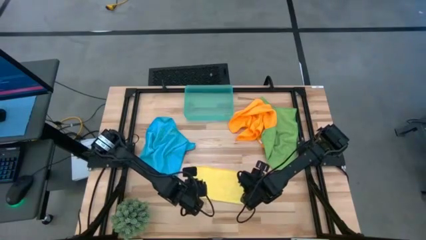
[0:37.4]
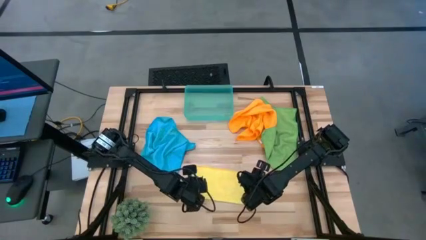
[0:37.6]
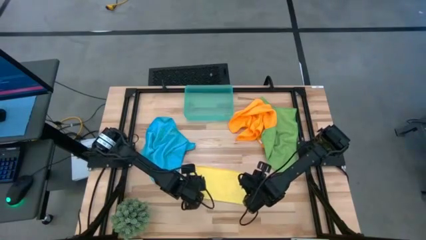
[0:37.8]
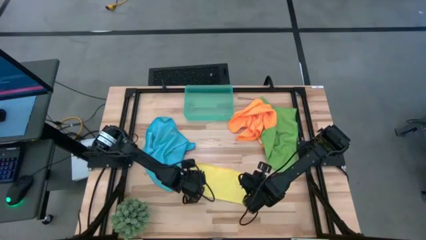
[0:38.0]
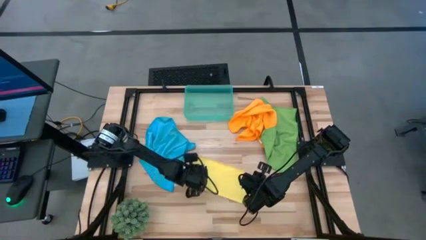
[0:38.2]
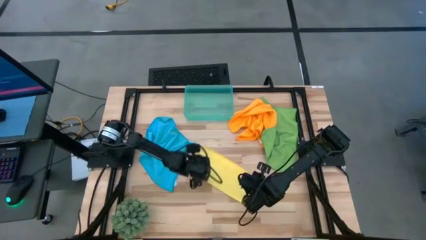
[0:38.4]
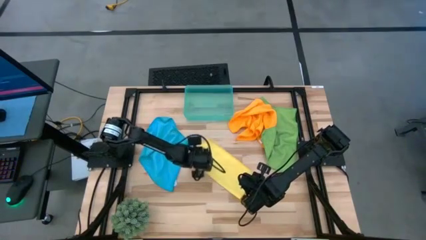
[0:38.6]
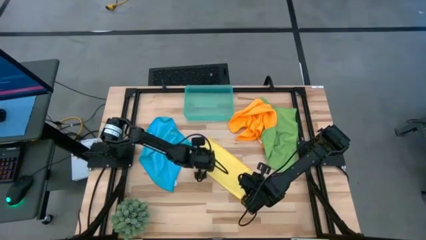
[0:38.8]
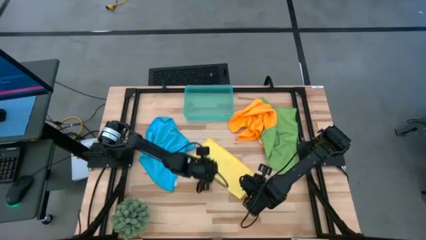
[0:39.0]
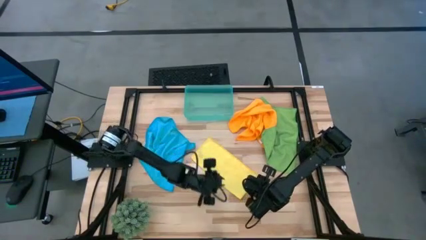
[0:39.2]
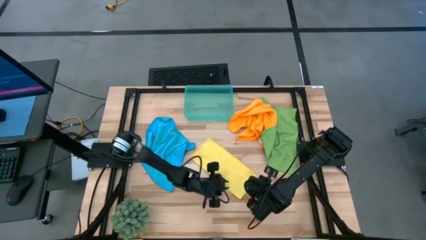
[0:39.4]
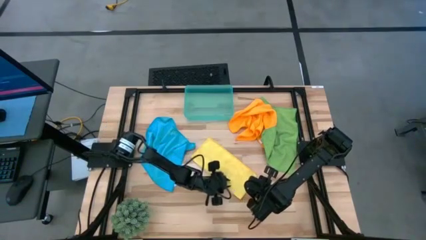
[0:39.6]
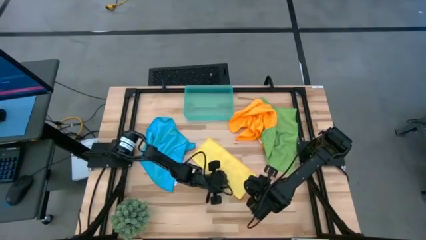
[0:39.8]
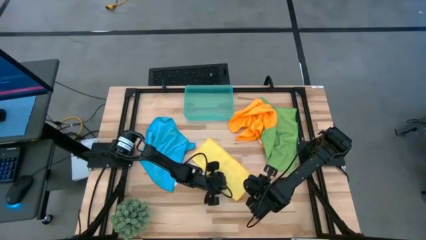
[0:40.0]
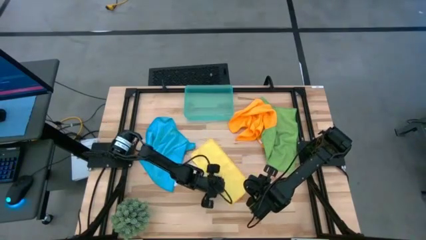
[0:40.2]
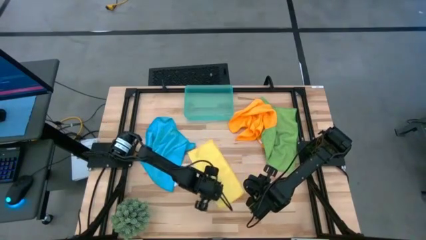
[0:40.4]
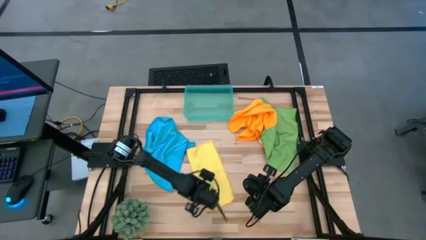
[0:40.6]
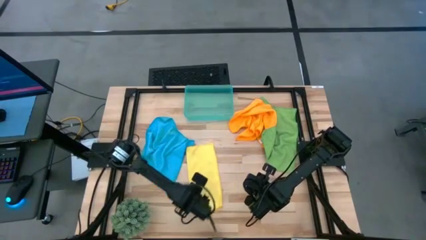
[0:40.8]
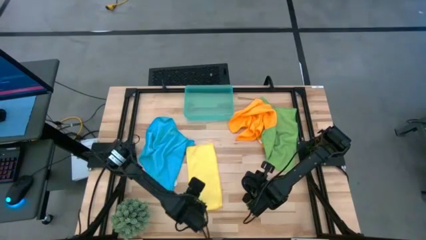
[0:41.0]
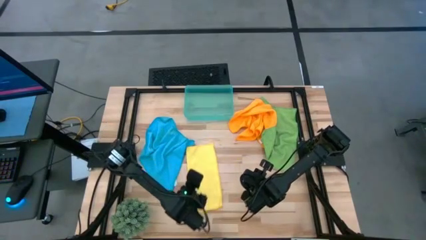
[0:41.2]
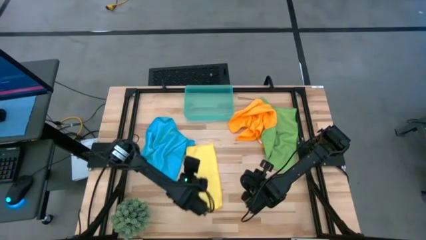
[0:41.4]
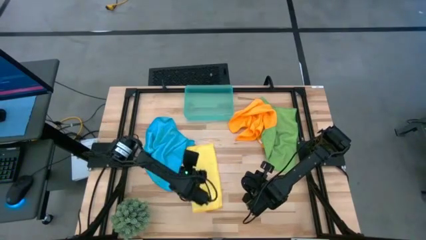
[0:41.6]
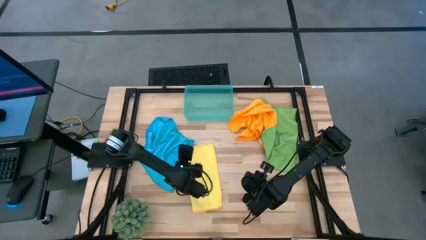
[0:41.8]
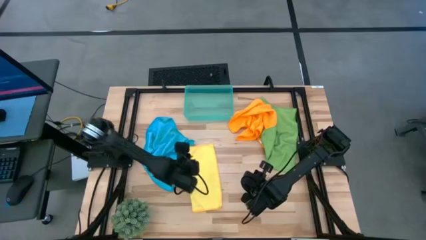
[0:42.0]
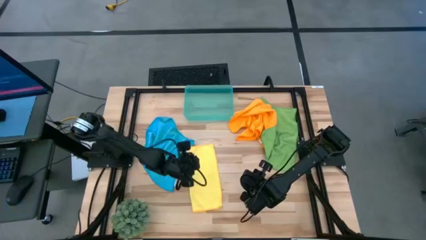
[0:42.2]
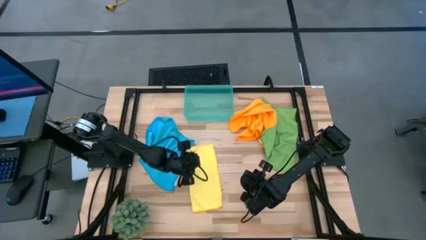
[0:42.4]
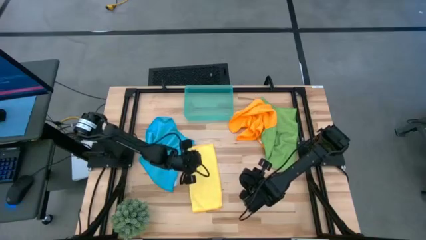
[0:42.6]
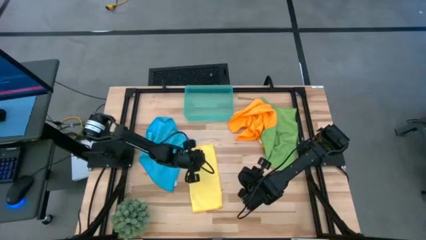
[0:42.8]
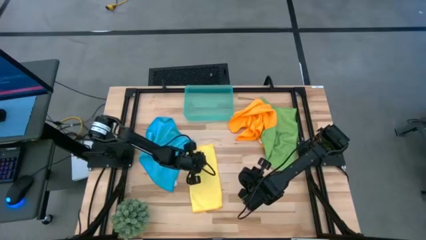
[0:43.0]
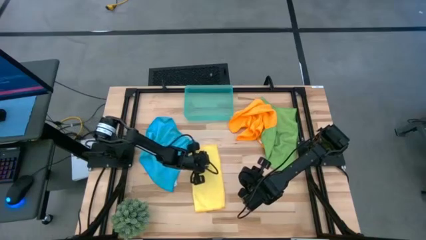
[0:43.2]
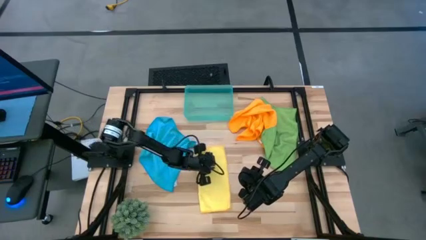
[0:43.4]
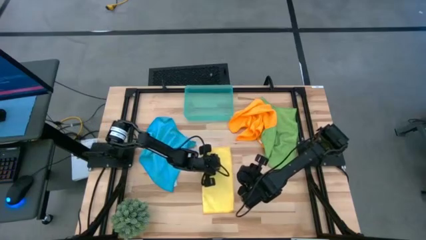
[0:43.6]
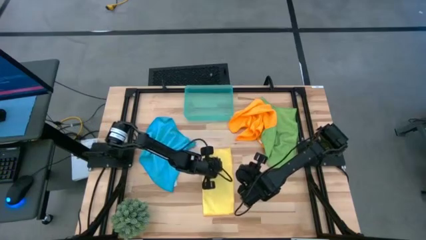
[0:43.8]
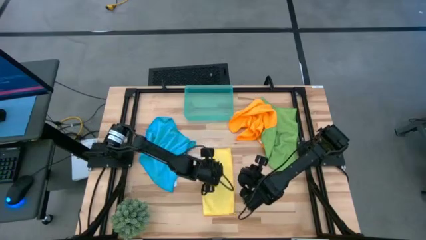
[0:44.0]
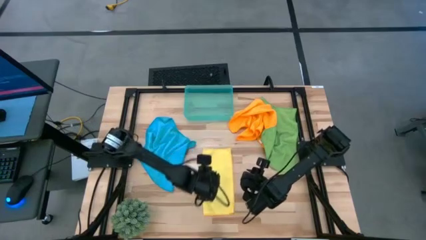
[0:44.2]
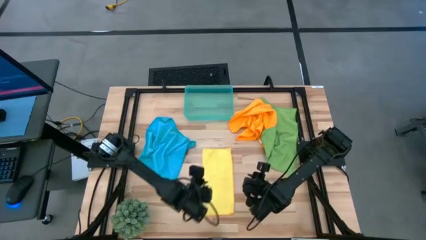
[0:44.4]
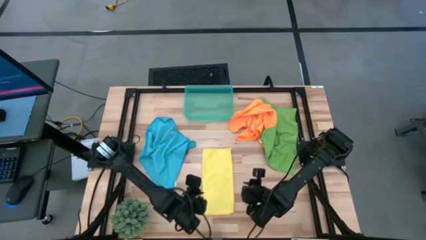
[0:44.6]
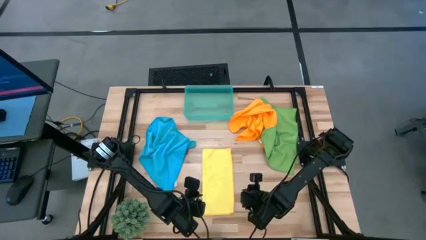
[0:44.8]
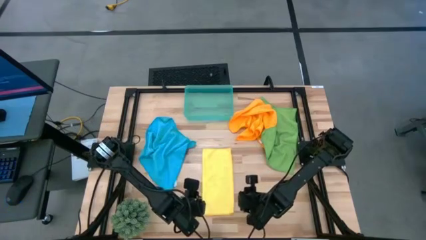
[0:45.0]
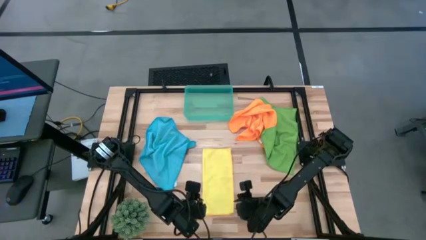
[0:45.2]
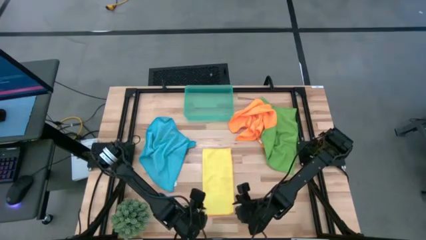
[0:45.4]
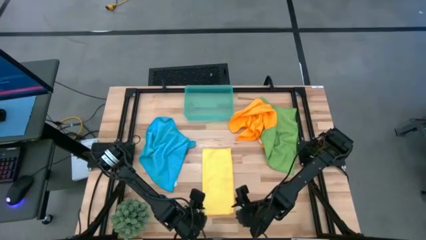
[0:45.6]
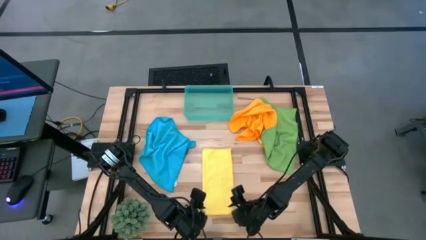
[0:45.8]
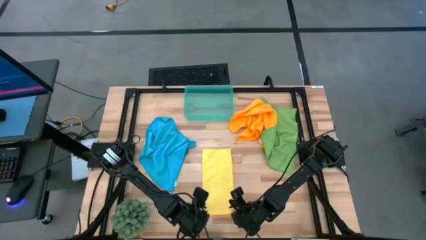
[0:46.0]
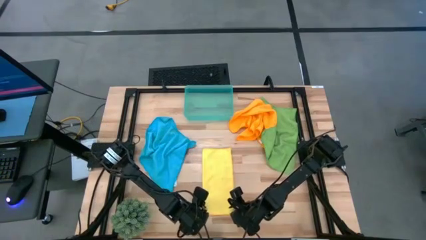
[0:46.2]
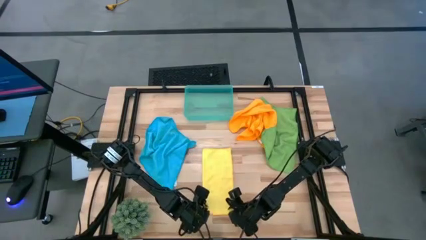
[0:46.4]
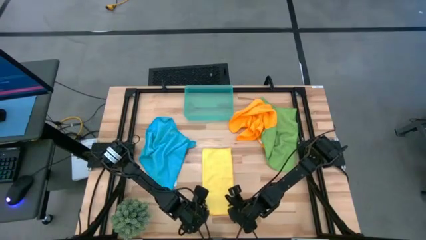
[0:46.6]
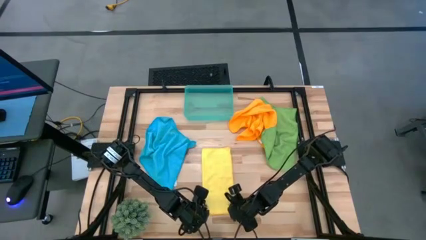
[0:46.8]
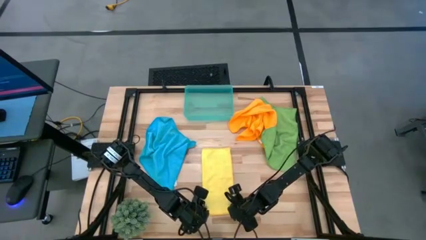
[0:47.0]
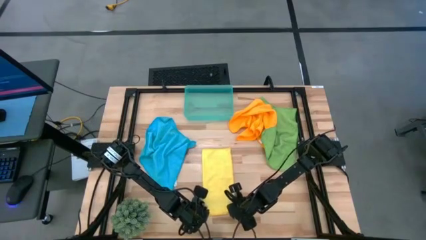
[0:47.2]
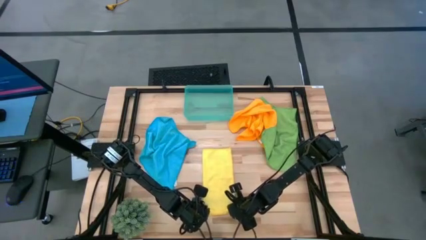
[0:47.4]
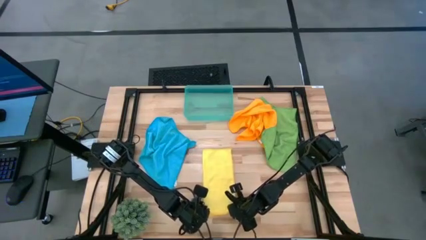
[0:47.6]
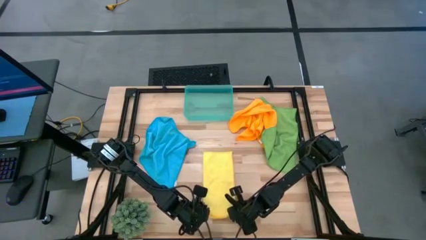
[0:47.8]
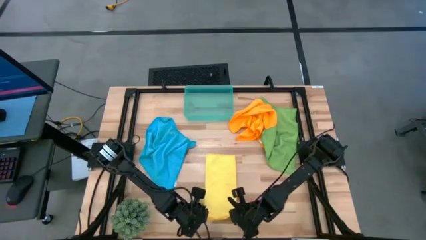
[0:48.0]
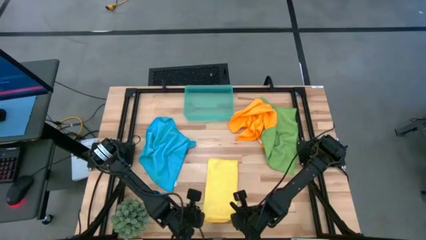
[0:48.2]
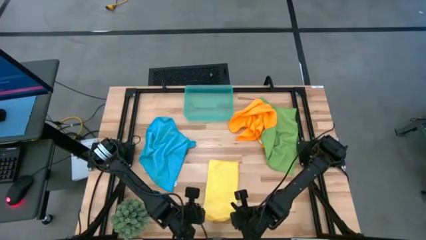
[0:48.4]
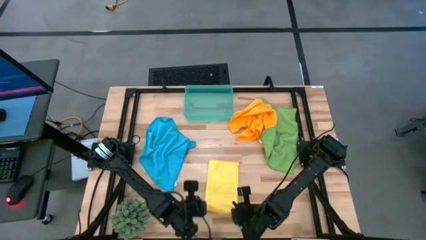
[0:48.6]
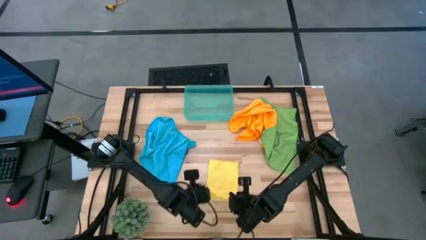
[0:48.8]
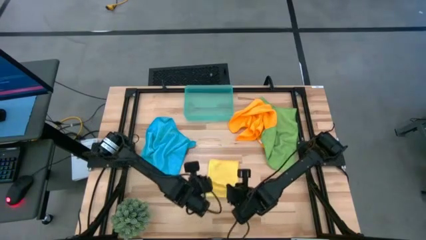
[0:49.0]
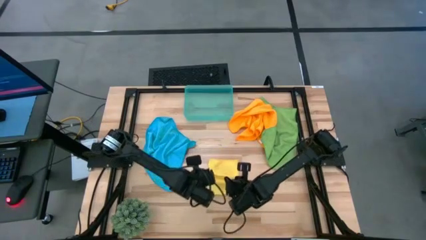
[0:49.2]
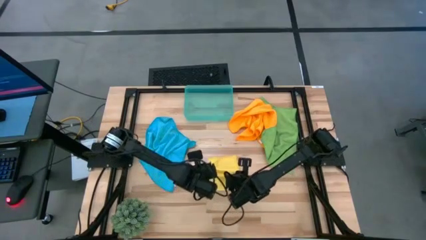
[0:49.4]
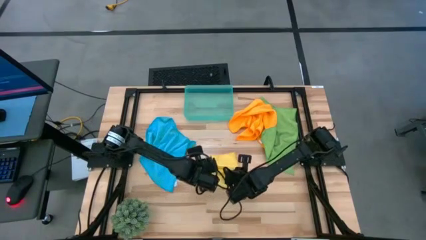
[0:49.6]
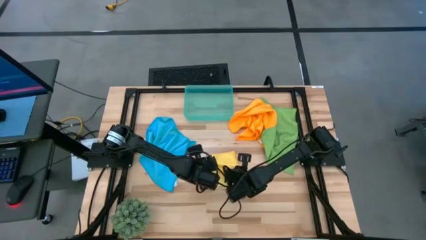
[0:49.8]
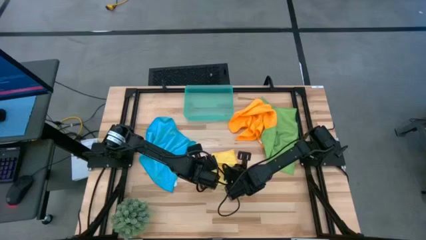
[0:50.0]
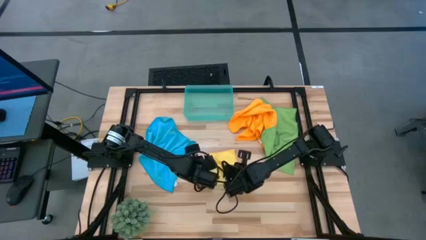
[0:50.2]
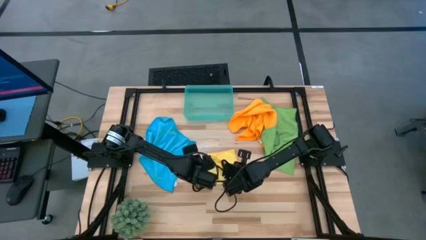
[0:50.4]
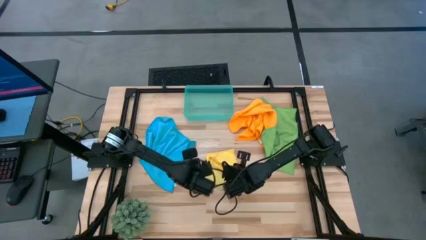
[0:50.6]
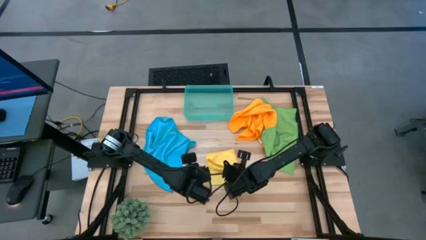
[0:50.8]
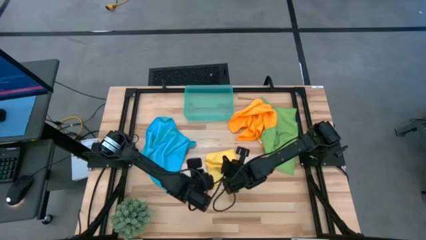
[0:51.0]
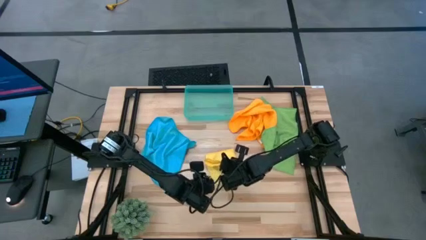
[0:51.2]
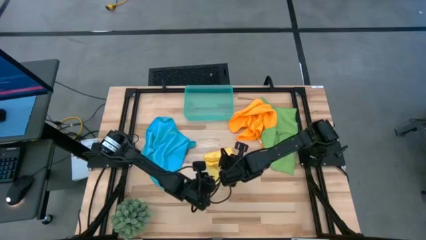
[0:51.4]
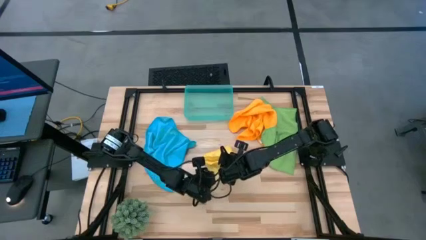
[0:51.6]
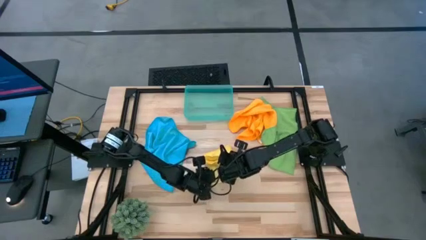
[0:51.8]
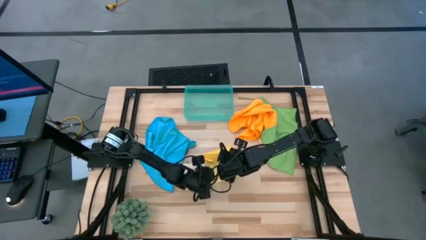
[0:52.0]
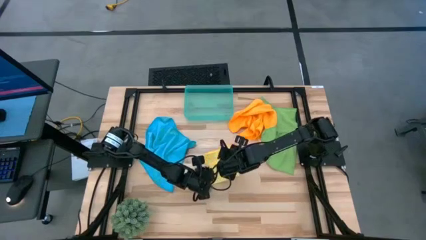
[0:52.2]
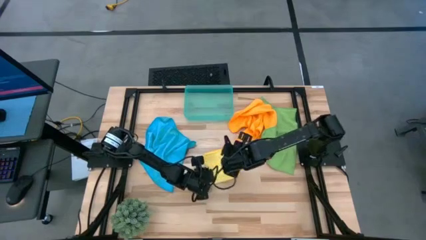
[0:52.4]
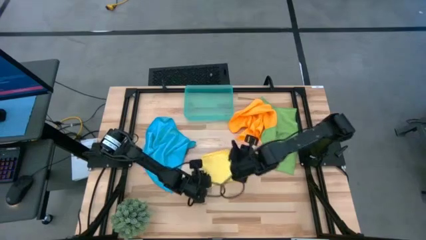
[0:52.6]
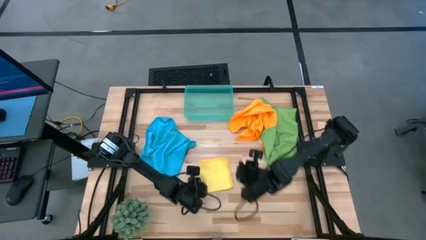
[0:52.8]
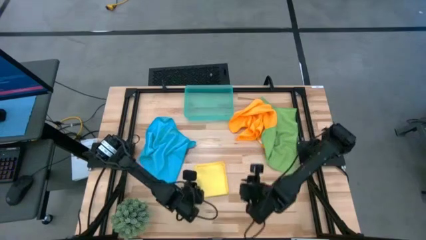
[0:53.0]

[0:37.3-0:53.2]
Task: Roll microfiber towels into tight, uniform cylinder then place into a basket
Fold the yellow microfiber towel
